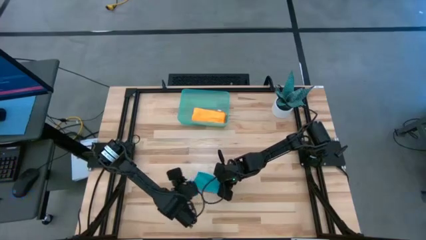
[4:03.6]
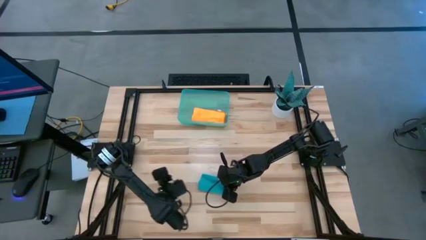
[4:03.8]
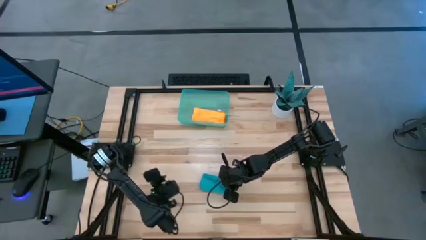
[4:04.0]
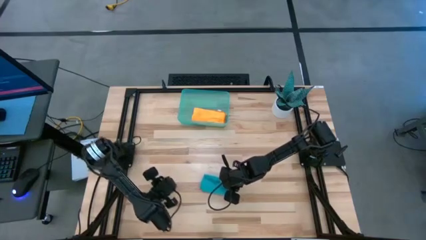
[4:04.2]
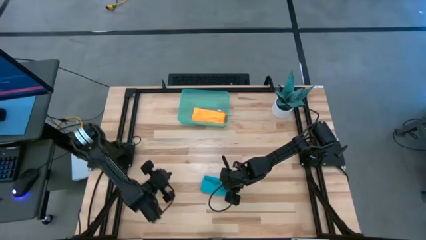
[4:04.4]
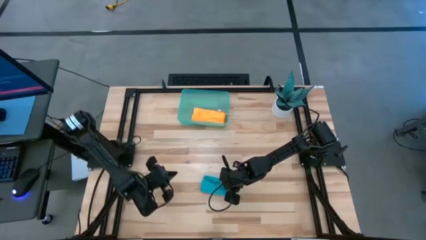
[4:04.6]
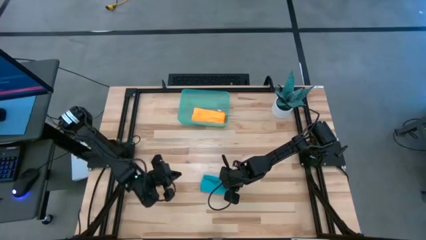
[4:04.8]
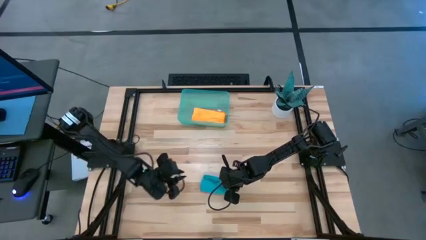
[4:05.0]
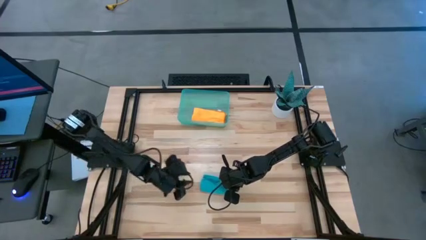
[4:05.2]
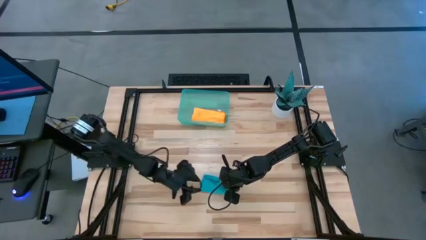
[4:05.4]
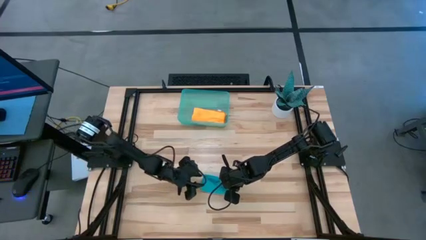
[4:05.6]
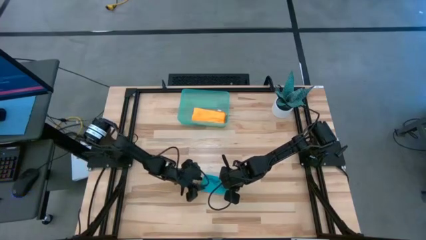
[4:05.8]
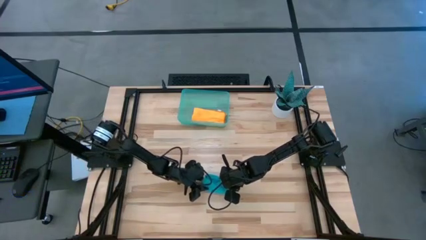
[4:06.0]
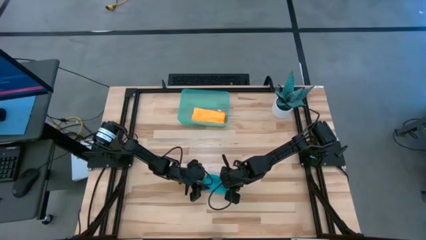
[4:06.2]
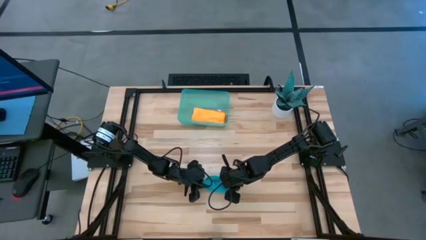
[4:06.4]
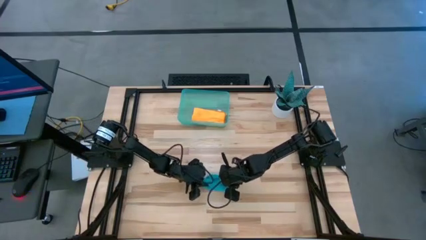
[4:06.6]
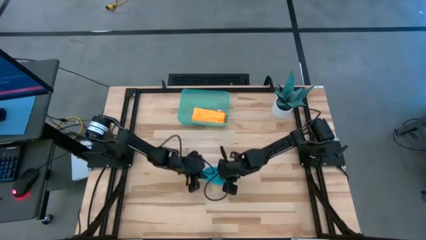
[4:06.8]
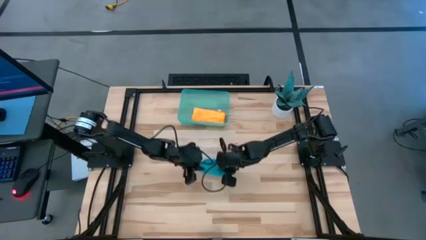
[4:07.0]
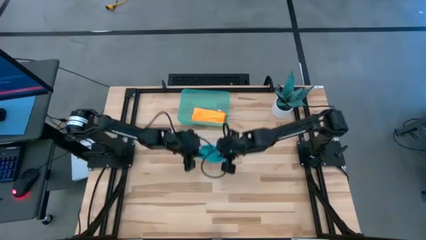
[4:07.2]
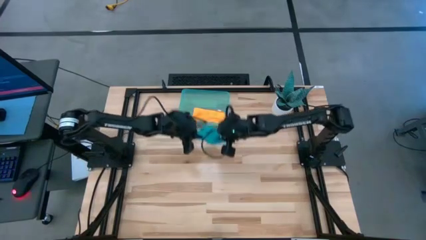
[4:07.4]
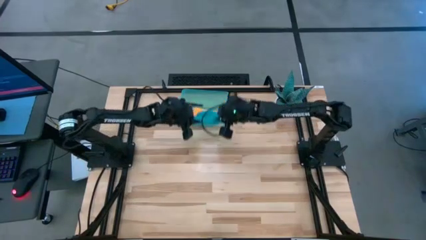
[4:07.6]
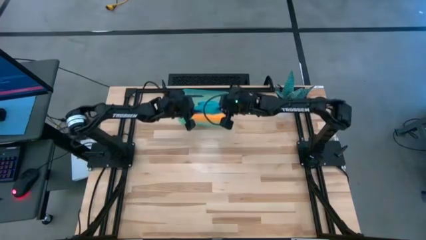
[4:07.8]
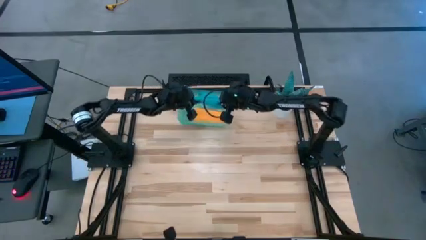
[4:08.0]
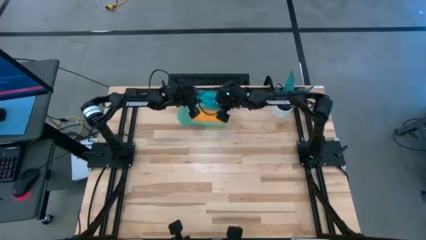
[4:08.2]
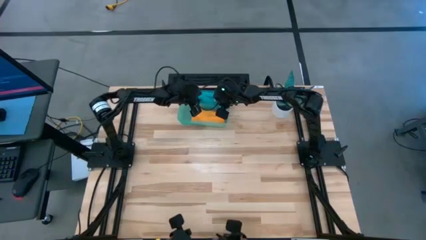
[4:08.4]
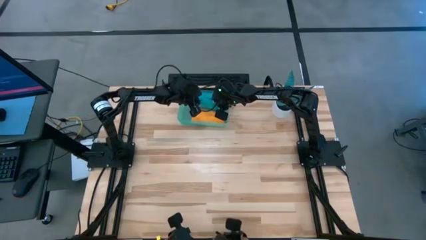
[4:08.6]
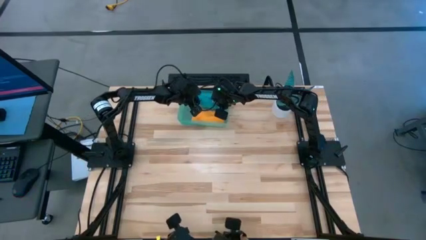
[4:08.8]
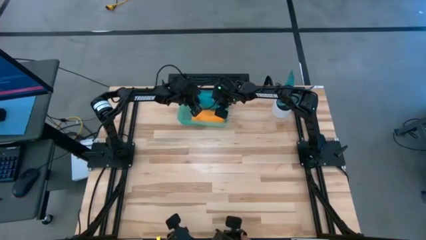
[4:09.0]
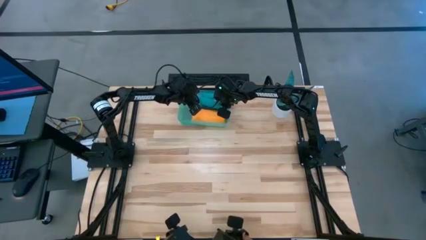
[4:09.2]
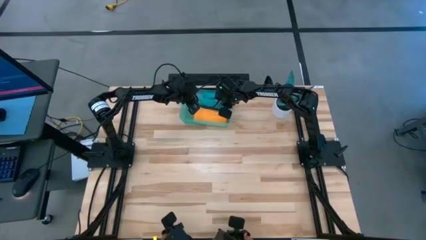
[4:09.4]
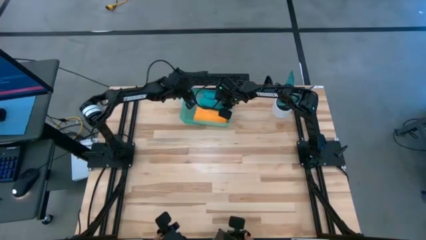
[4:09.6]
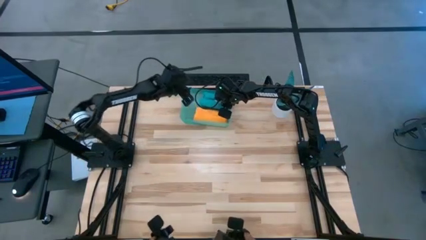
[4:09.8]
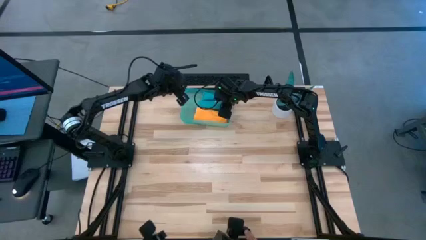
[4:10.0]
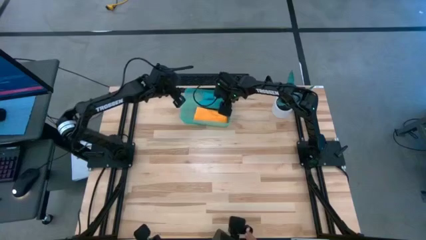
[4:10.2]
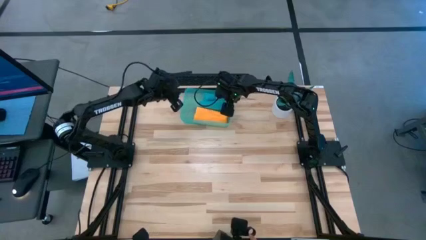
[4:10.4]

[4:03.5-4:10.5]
Task: Roll microfiber towels into tight, uniform cylinder then place into a basket
Put the blue microfiber towel into the blue bin

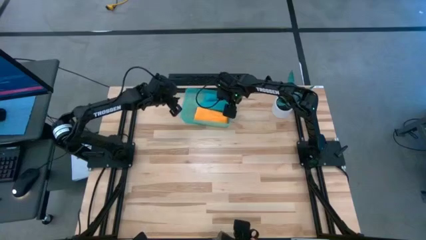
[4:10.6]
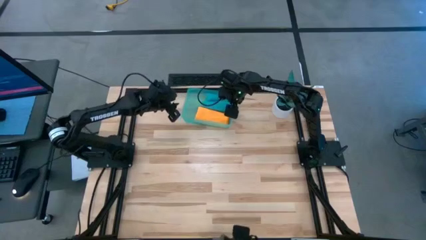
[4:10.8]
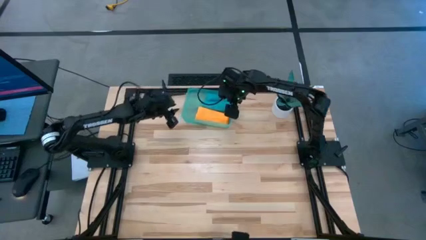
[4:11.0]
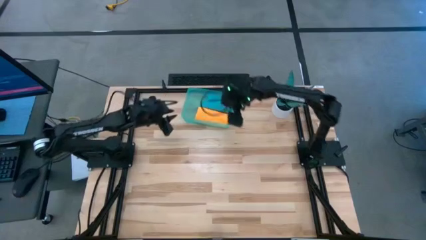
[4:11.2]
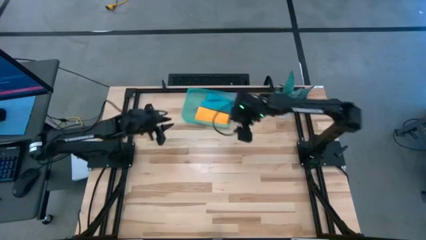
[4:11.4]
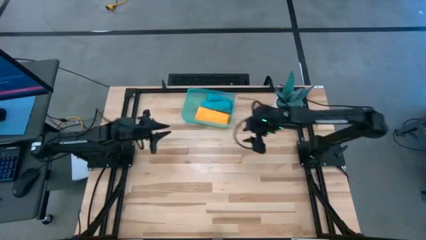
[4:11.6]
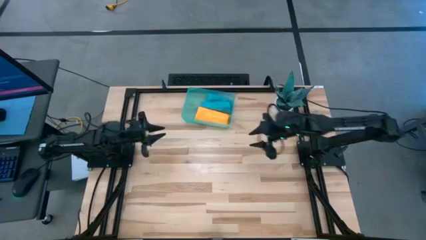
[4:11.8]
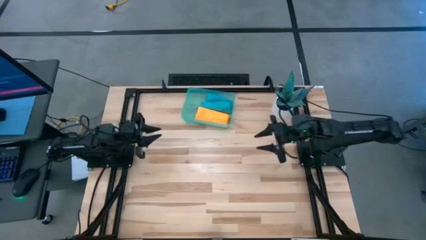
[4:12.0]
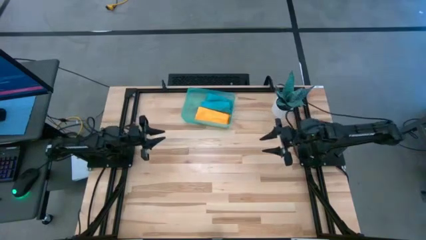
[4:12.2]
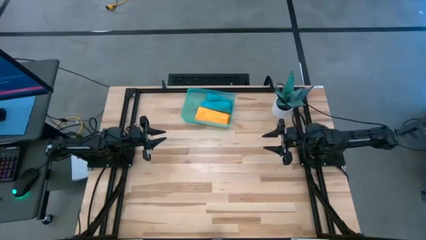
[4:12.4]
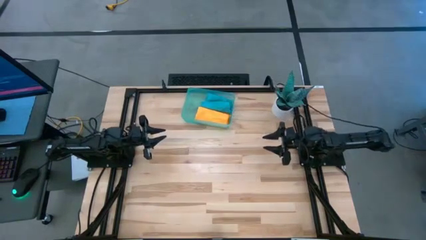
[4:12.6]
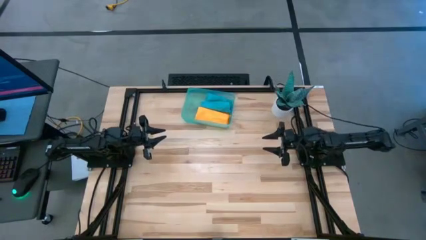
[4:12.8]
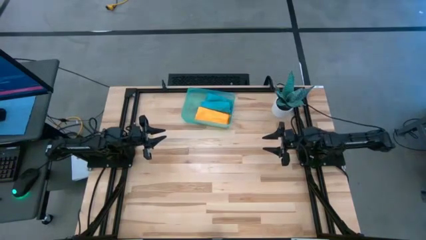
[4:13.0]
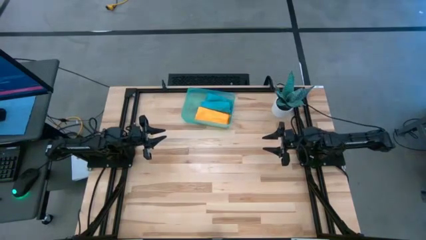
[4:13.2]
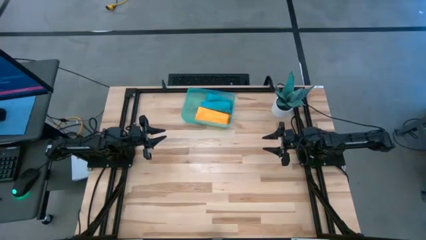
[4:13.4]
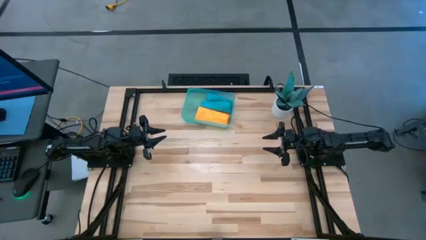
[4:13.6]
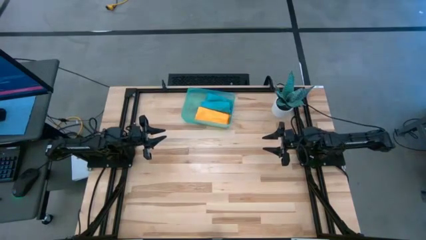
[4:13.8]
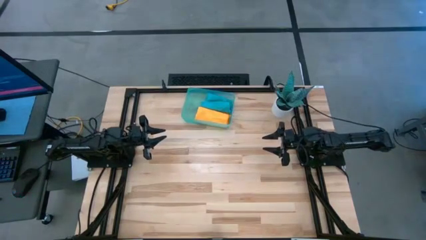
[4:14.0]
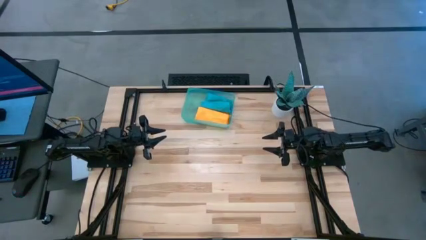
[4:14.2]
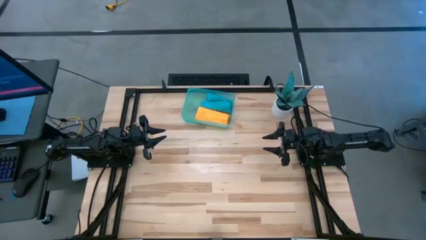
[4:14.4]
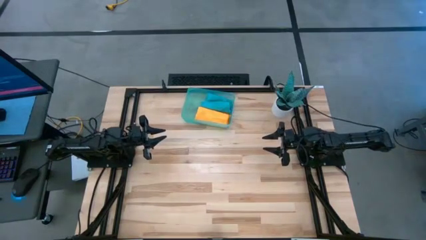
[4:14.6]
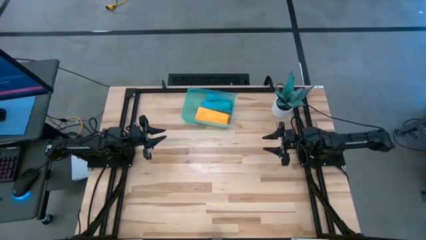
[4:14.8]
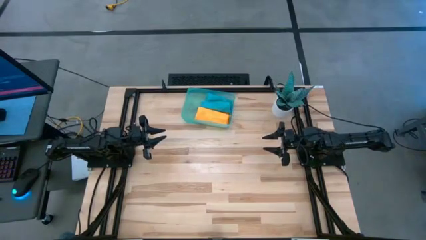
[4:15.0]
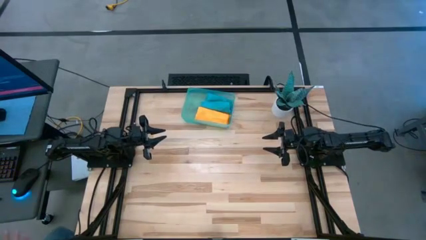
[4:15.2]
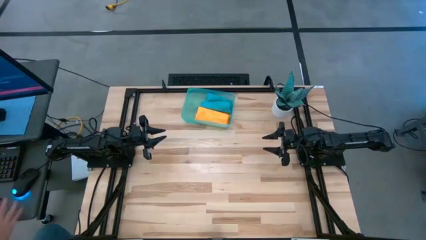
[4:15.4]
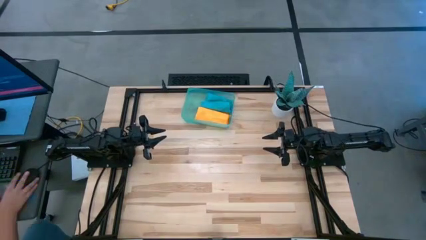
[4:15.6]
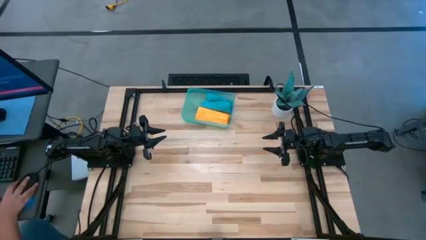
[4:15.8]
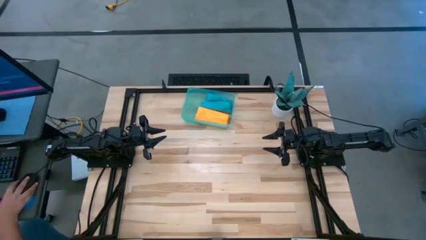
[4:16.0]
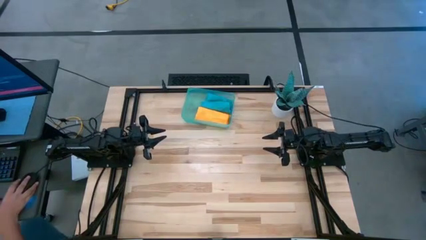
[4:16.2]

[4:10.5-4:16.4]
Return to Home Position
